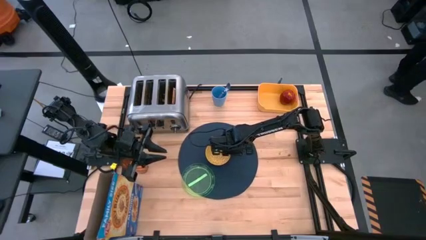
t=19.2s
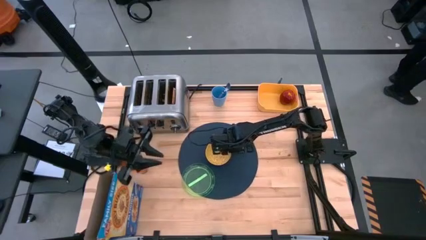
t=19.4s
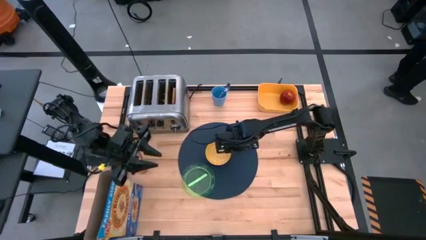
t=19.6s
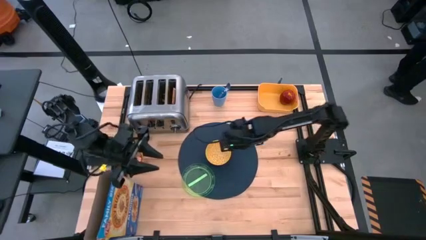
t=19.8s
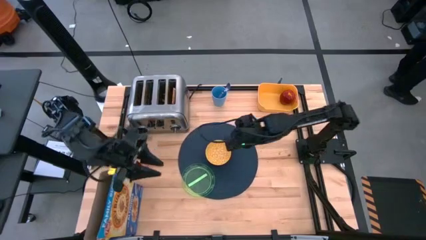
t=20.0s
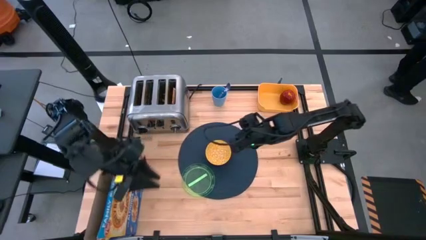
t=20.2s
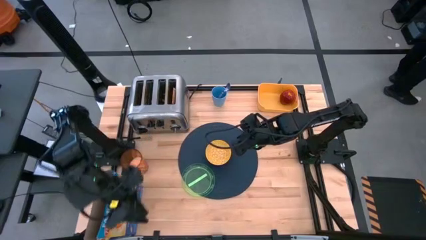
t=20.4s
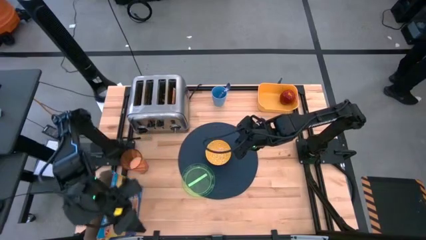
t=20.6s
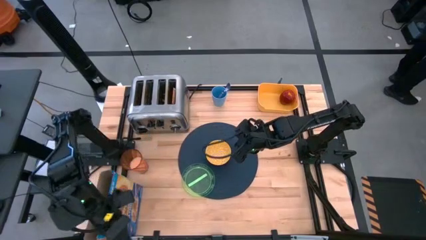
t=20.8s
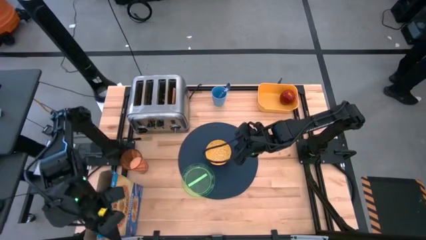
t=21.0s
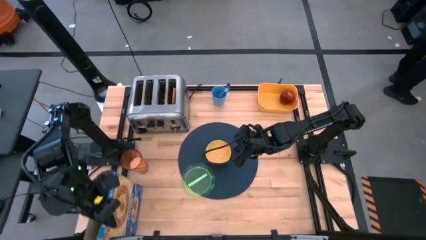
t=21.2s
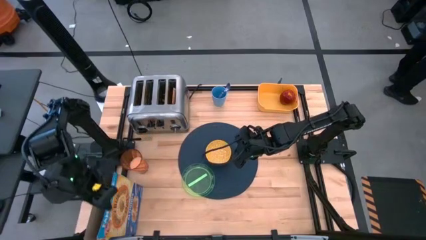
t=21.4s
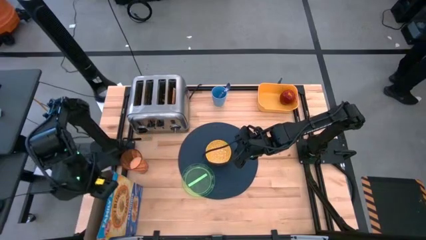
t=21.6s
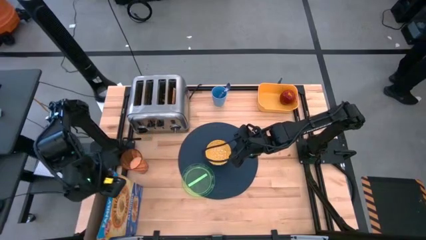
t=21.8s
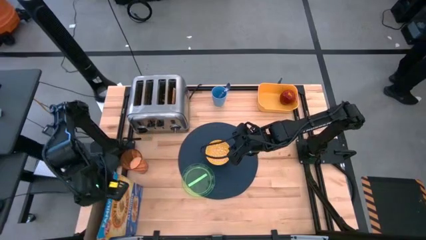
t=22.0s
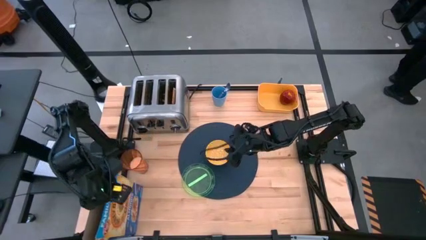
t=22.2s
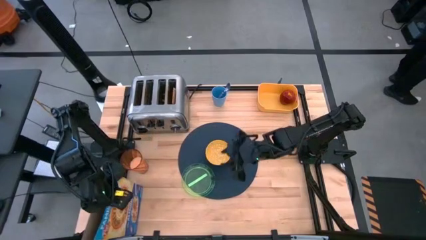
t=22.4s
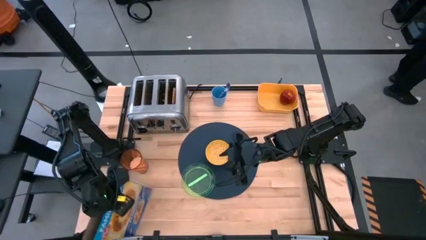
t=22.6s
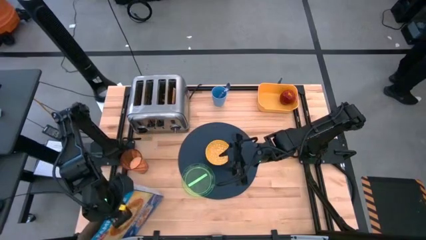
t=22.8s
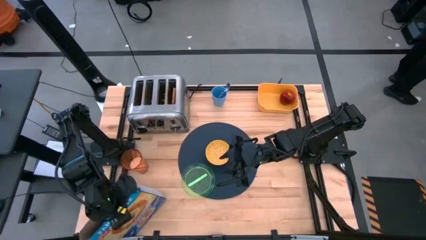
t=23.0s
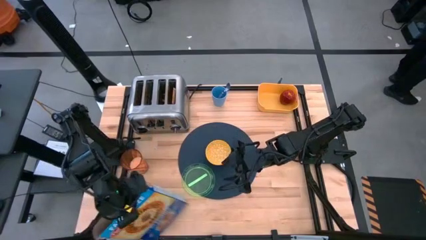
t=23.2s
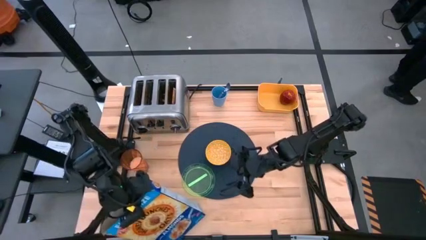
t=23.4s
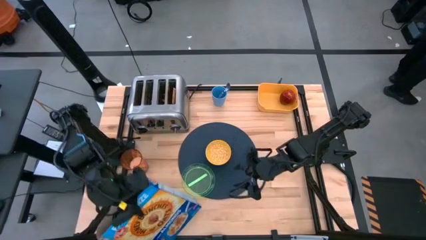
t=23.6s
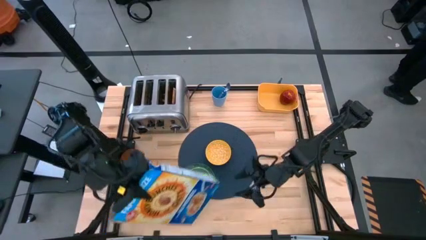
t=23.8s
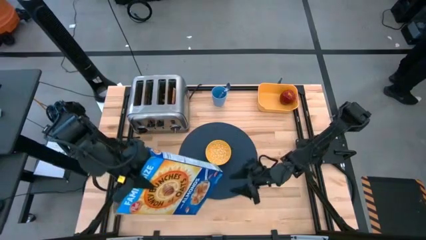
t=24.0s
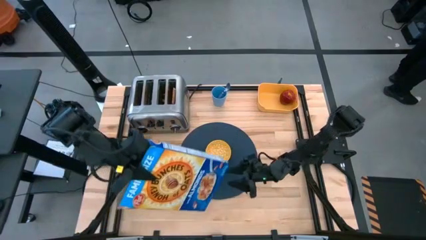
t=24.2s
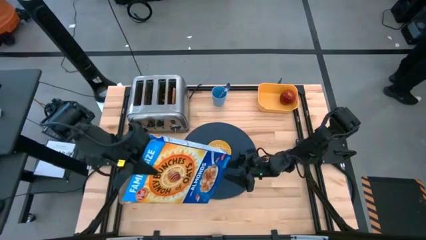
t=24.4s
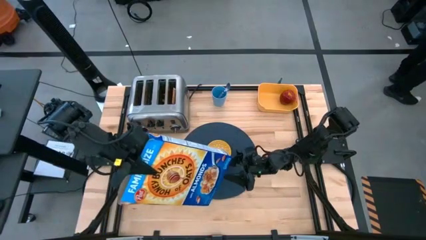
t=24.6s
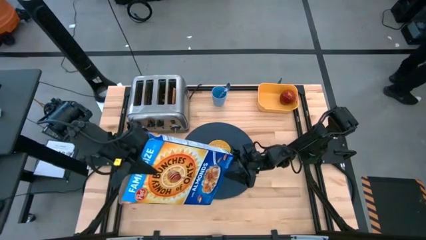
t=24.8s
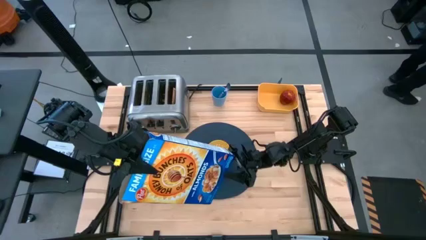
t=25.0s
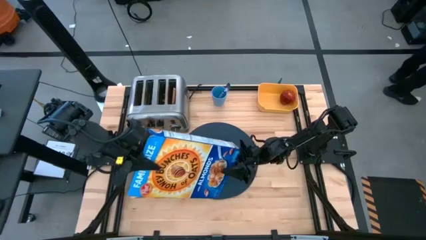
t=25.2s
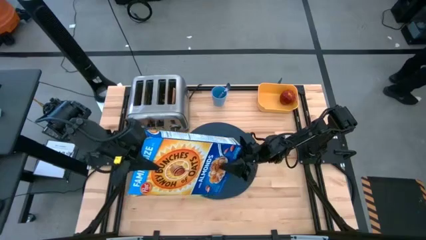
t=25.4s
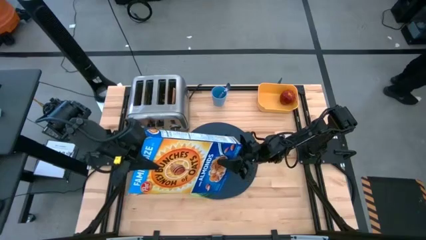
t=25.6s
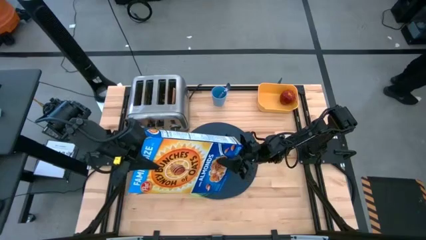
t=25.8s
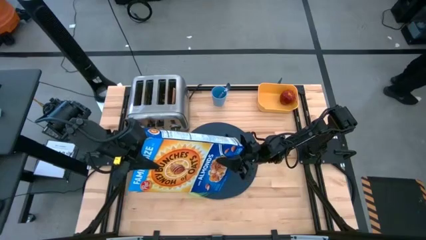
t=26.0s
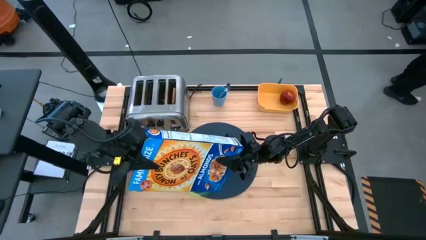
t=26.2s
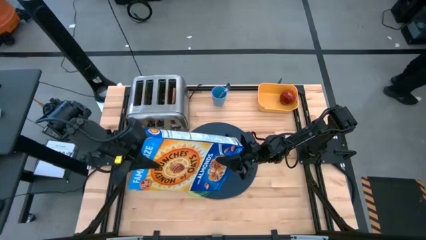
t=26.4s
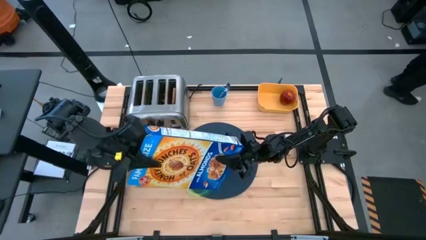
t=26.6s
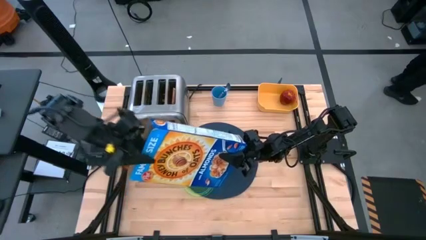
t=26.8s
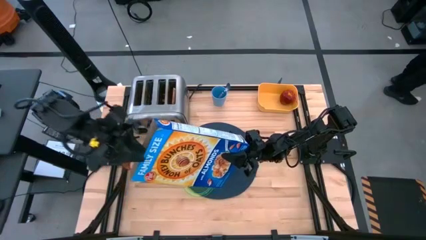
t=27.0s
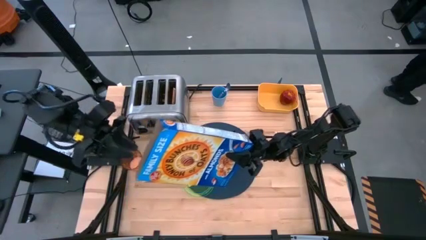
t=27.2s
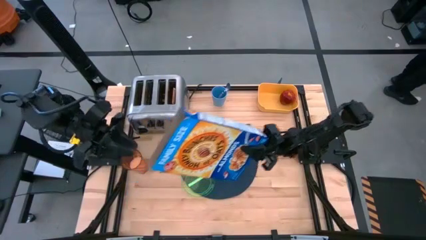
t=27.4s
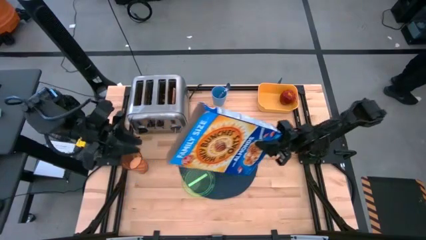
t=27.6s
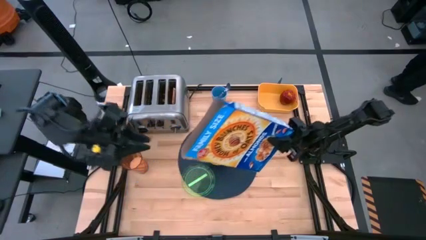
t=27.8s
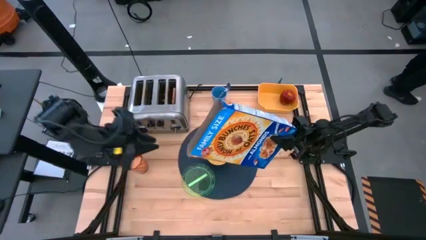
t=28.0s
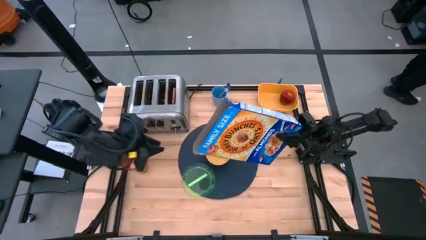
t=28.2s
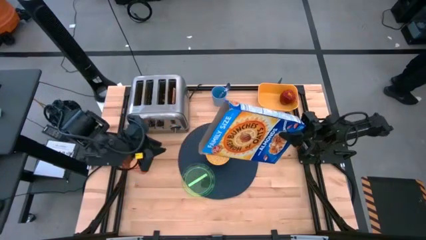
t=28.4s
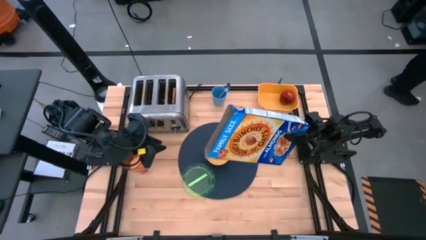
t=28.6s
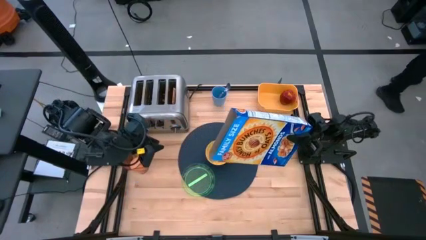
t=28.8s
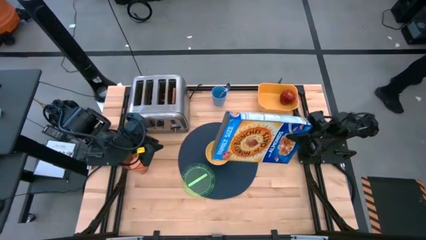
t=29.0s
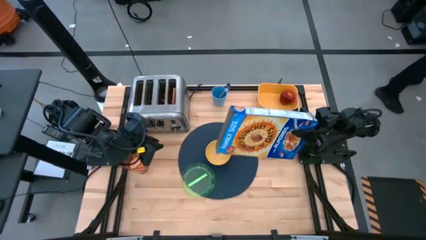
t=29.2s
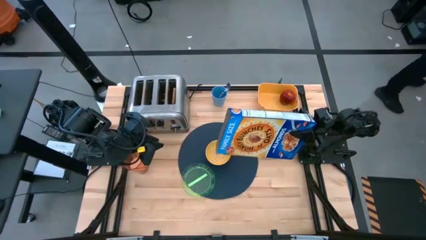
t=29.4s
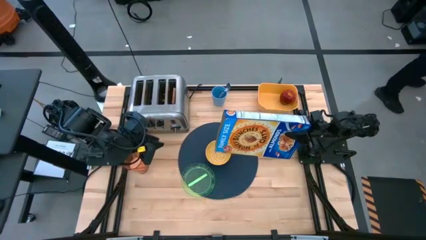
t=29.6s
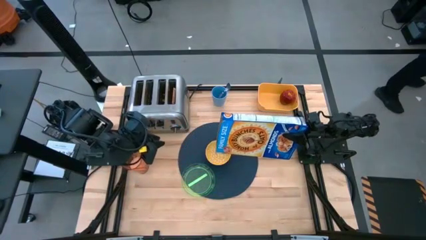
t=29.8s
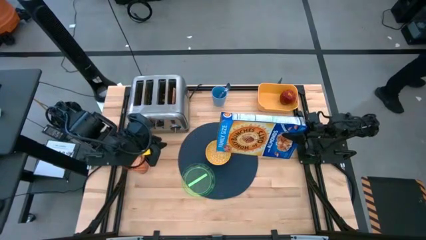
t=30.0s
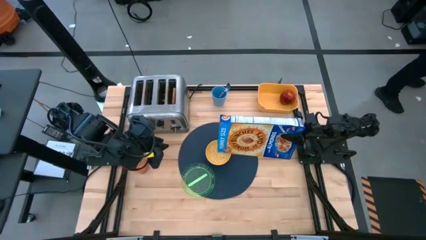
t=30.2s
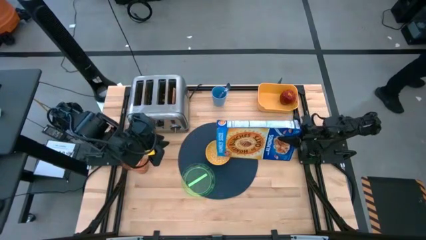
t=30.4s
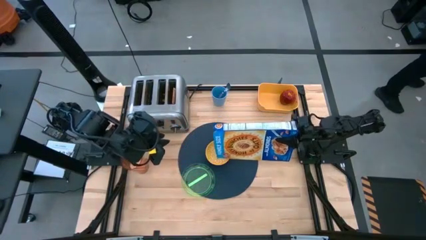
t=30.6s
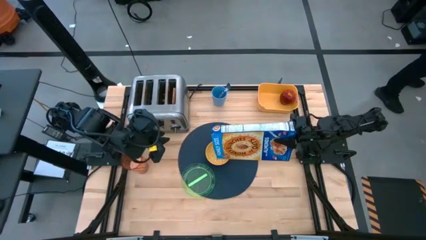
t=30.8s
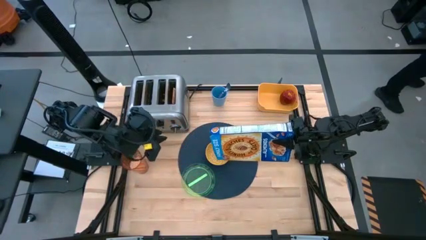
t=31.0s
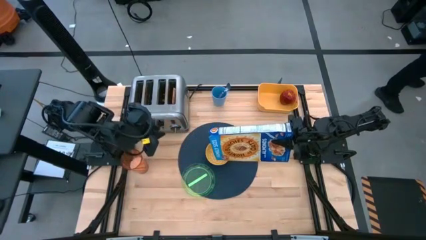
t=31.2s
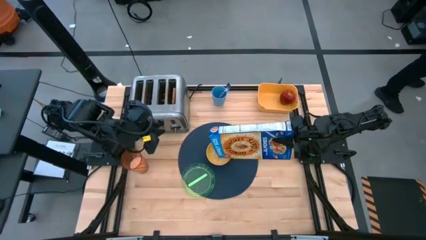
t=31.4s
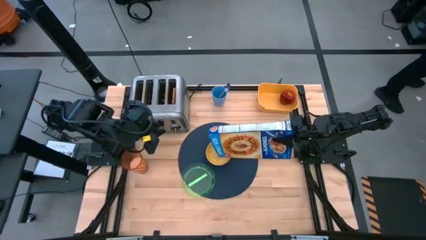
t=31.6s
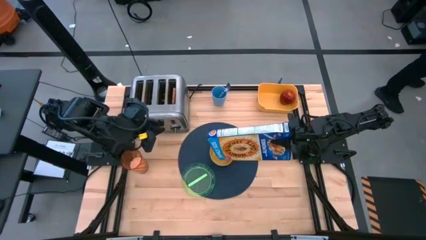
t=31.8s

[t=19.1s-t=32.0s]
Task: Arrange a breakfast setting
Pour the cereal from the box into the yellow bowl on the placemat

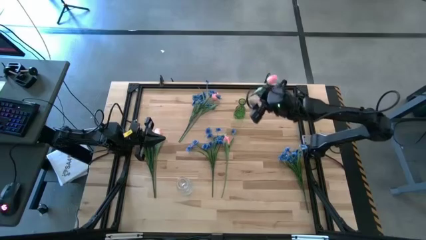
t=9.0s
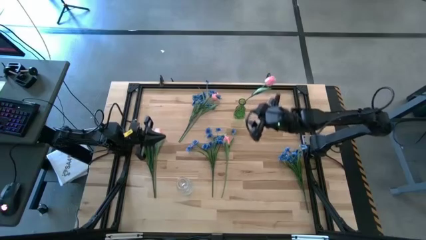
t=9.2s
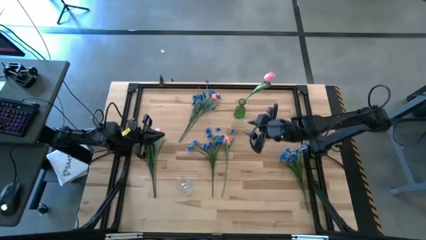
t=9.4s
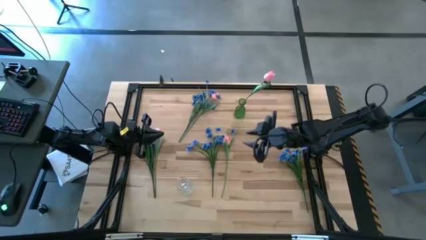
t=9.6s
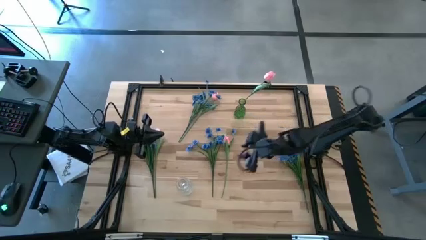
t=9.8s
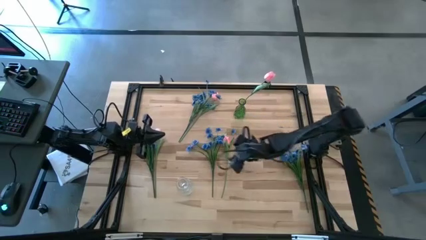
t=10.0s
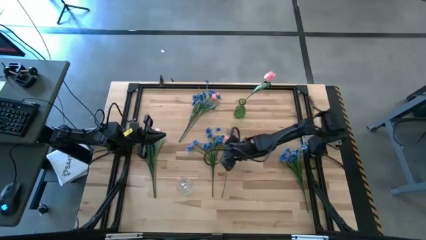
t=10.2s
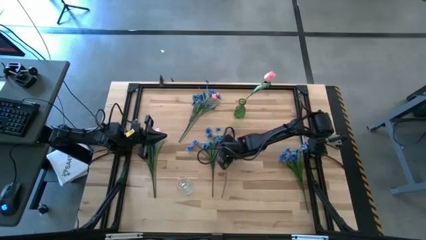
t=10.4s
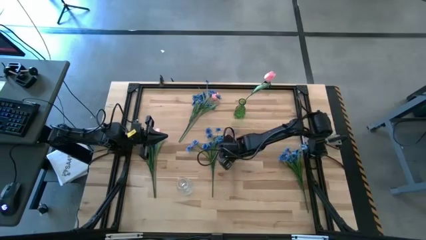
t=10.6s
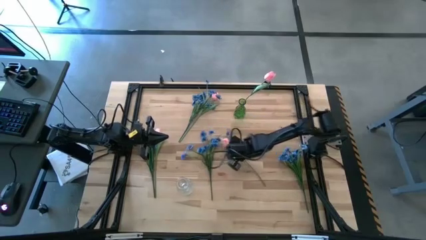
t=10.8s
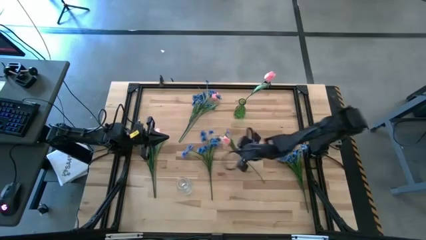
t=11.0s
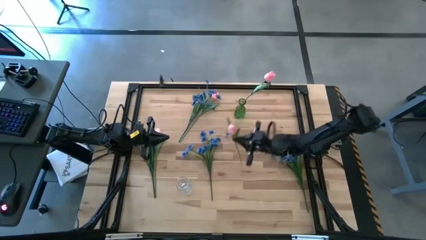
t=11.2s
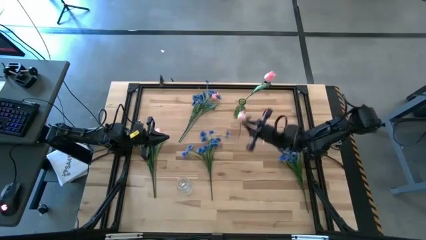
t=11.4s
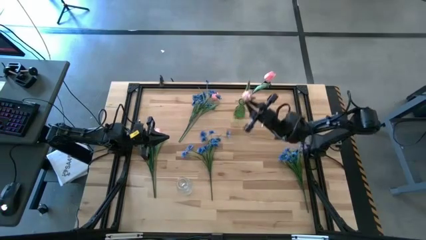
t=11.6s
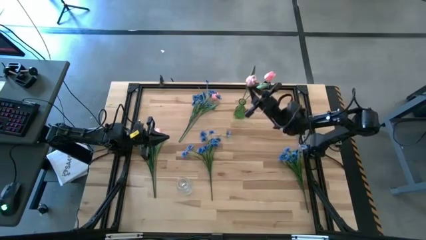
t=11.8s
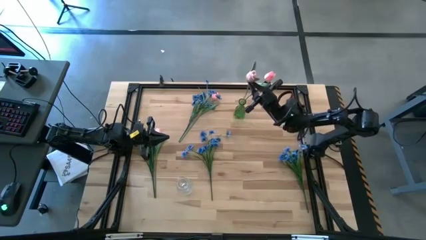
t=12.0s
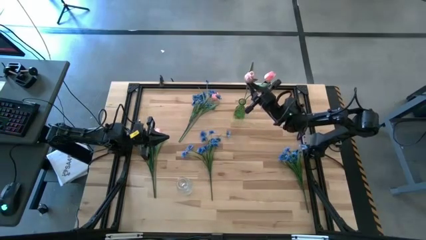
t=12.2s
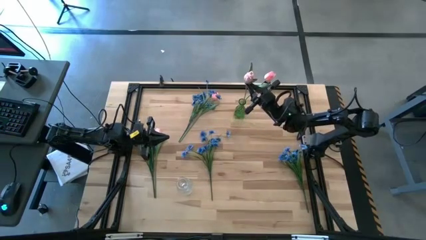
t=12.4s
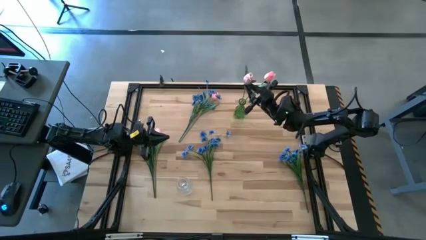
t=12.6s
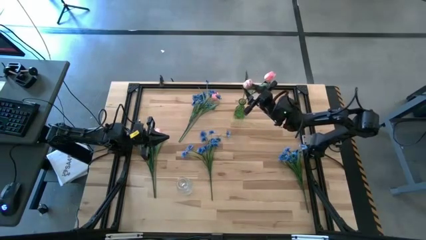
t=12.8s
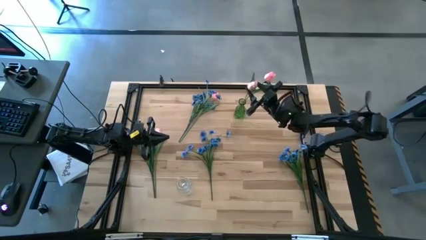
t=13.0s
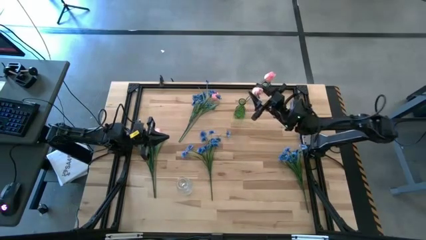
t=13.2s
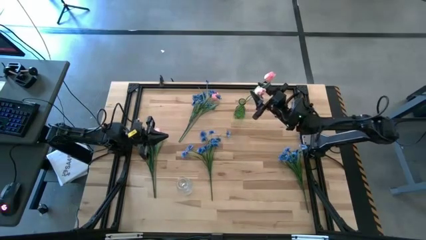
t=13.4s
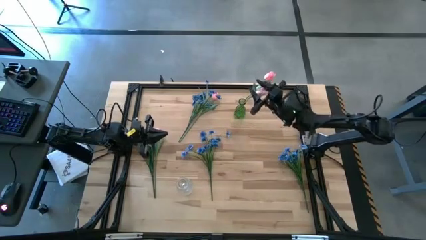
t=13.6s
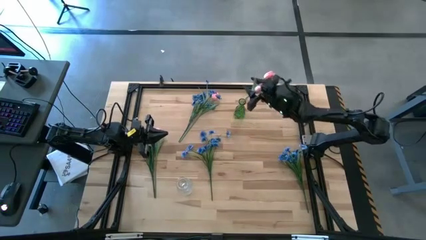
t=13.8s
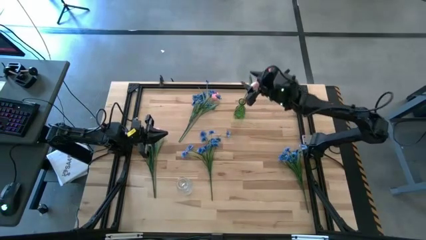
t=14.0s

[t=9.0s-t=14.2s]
Task: Sort flowers into vase by color
Put the pink flower into the green vase
